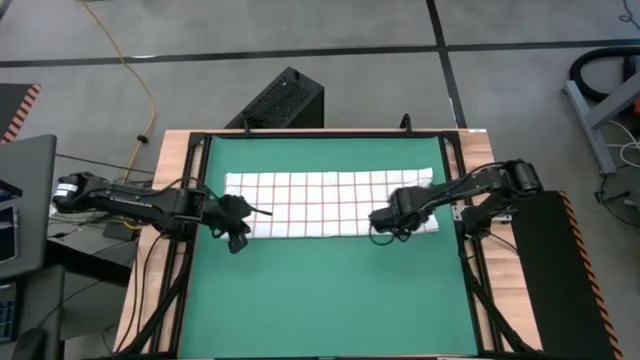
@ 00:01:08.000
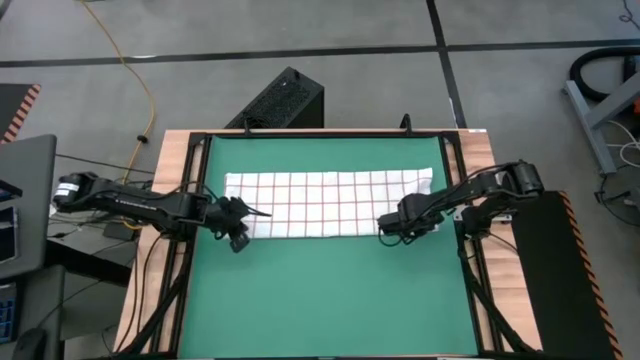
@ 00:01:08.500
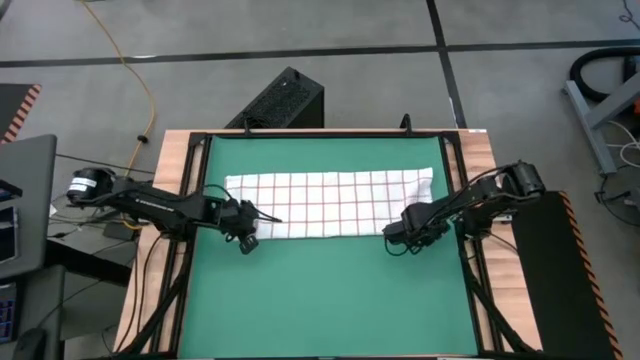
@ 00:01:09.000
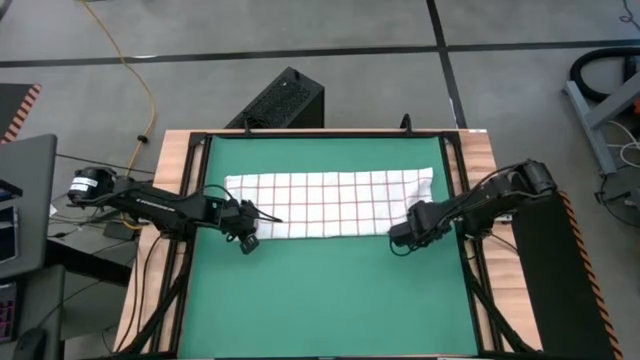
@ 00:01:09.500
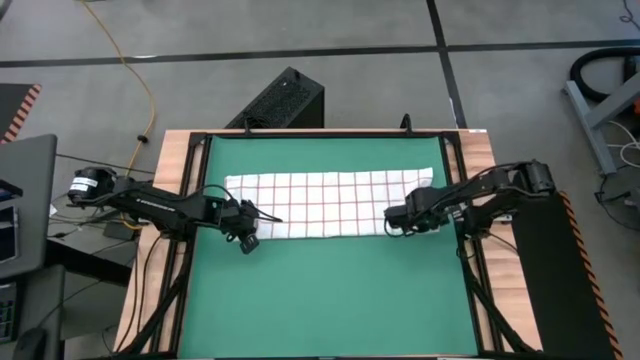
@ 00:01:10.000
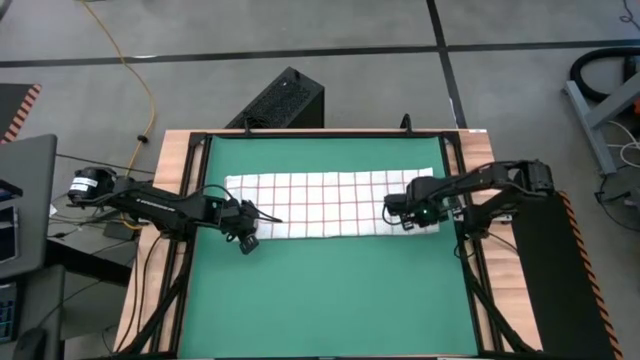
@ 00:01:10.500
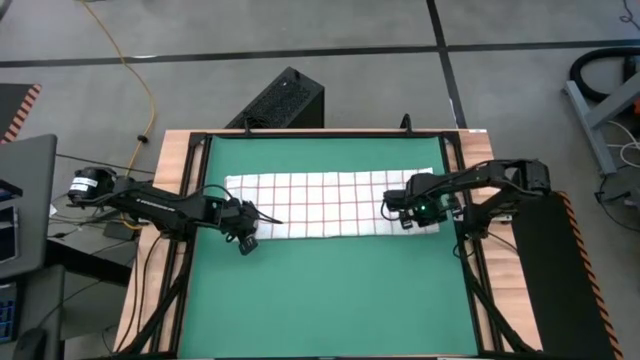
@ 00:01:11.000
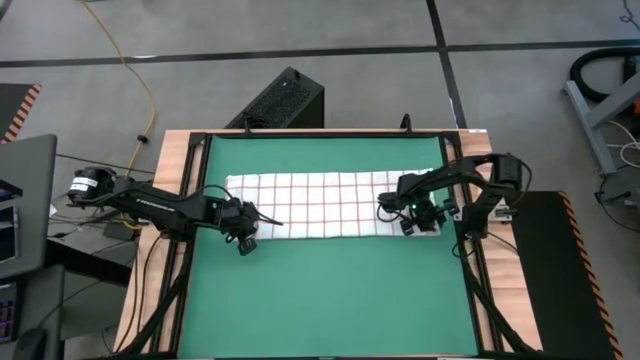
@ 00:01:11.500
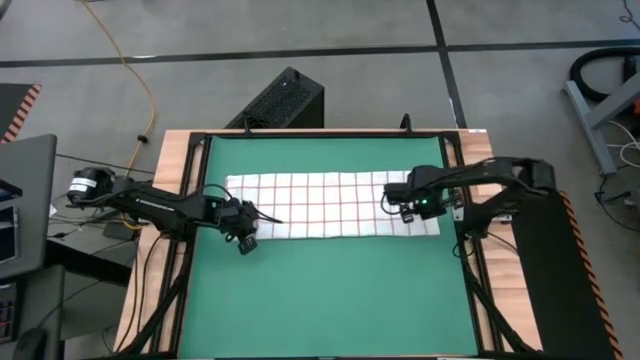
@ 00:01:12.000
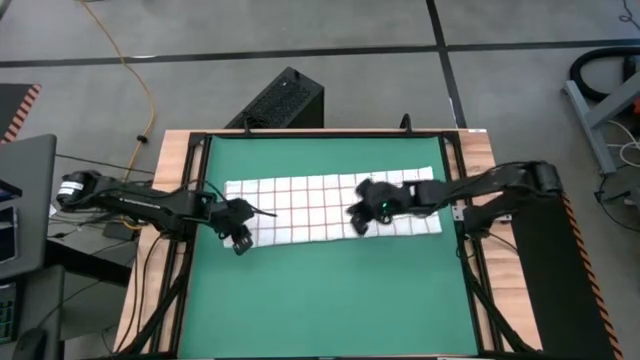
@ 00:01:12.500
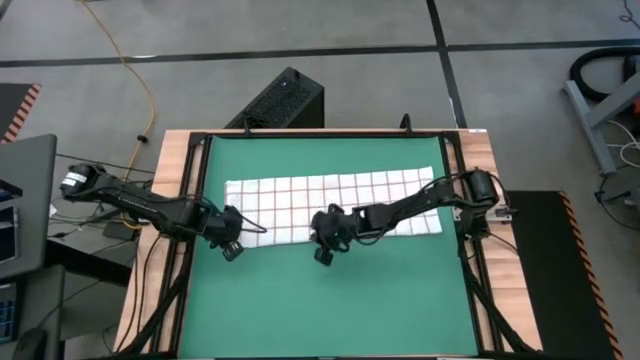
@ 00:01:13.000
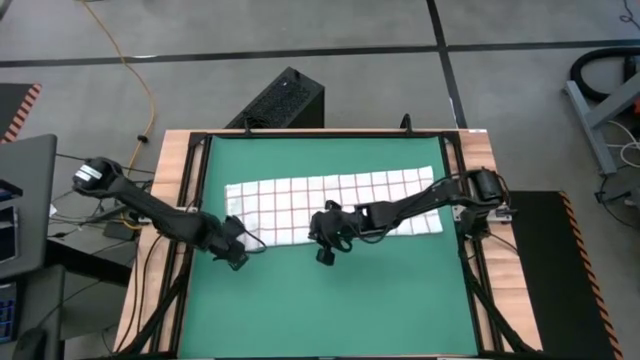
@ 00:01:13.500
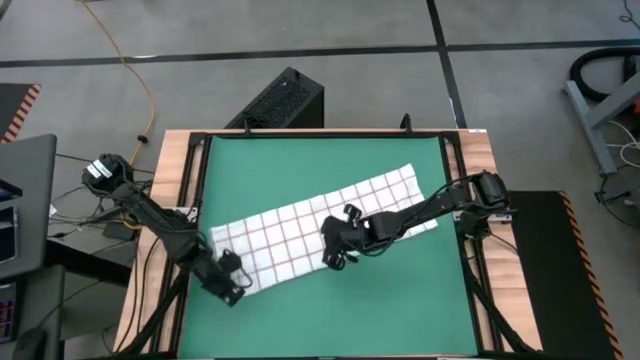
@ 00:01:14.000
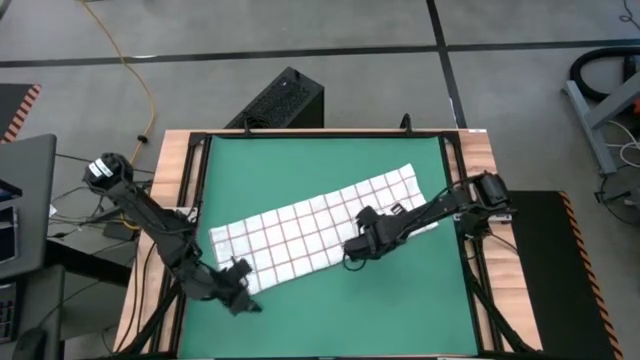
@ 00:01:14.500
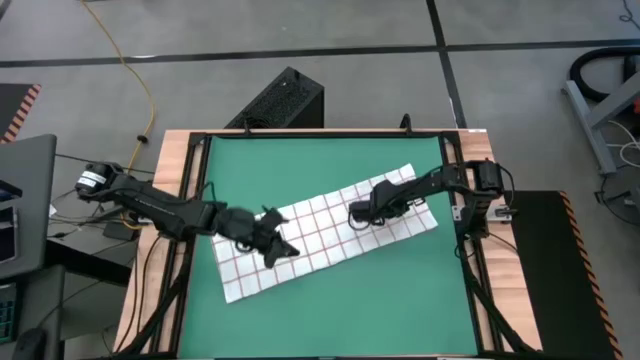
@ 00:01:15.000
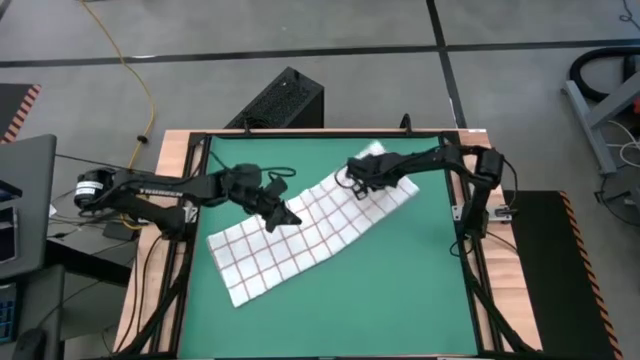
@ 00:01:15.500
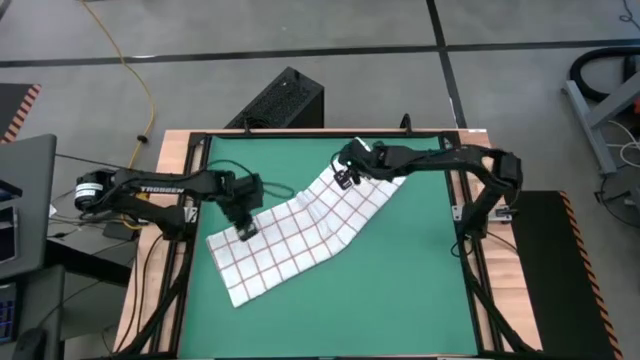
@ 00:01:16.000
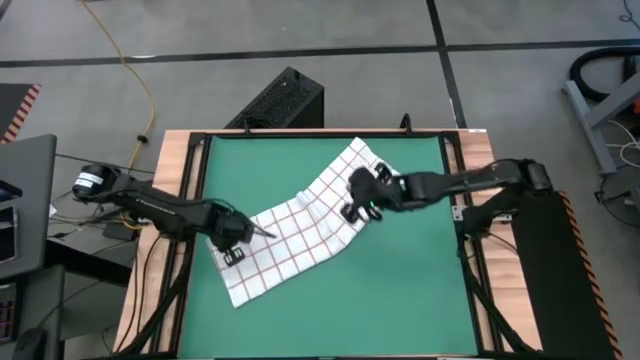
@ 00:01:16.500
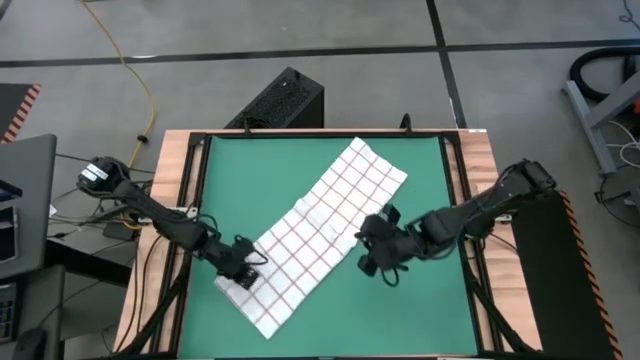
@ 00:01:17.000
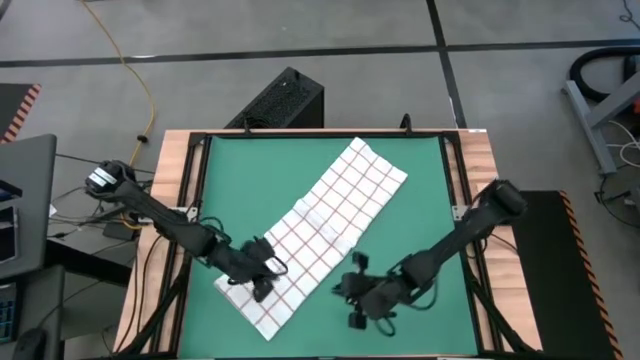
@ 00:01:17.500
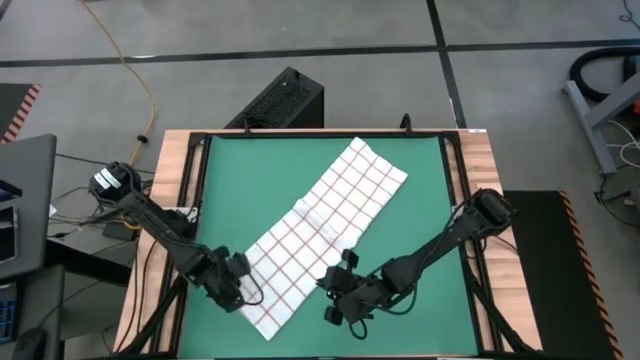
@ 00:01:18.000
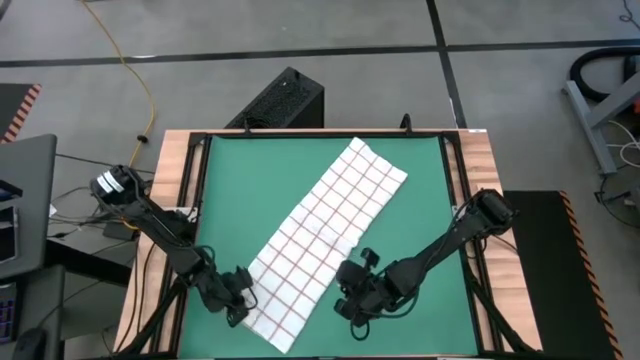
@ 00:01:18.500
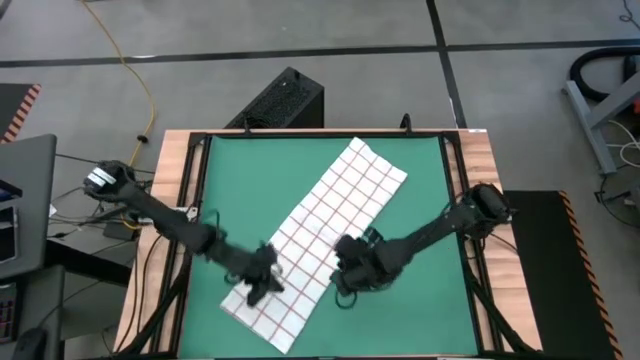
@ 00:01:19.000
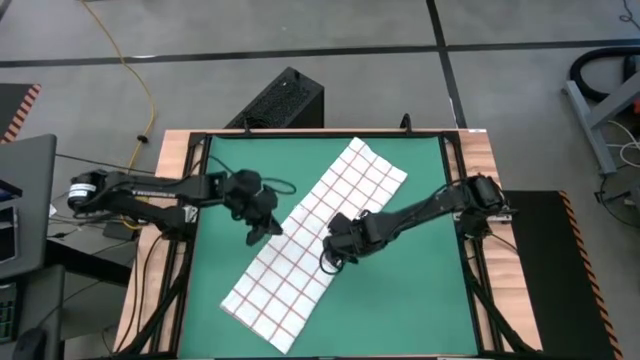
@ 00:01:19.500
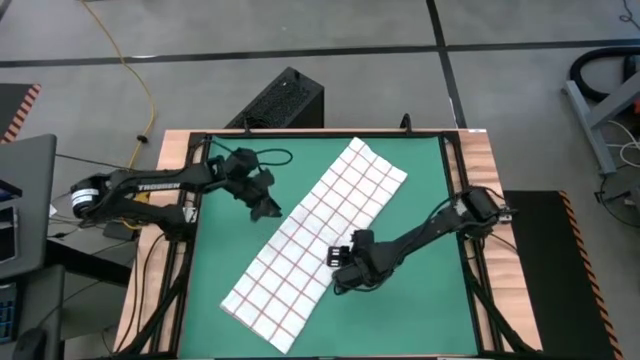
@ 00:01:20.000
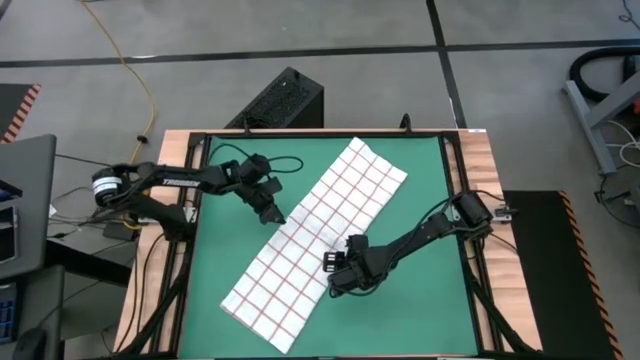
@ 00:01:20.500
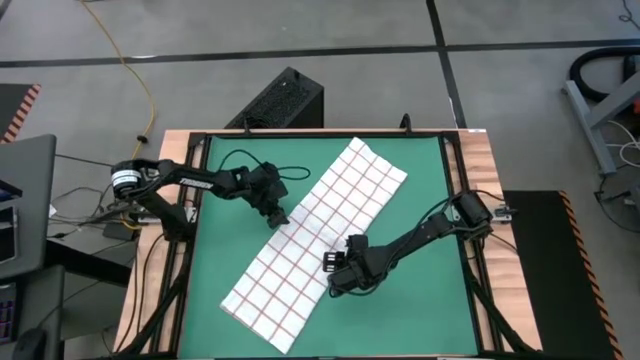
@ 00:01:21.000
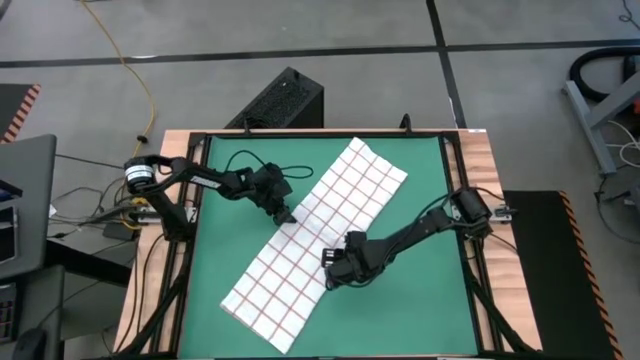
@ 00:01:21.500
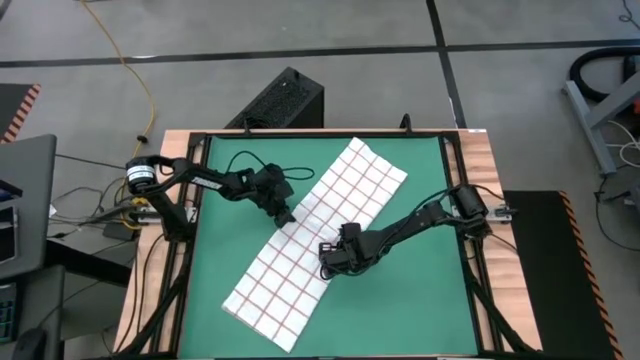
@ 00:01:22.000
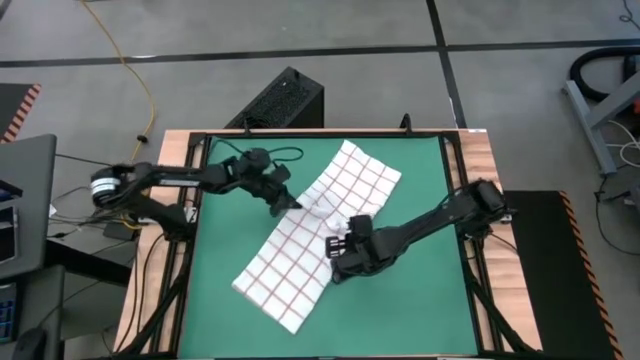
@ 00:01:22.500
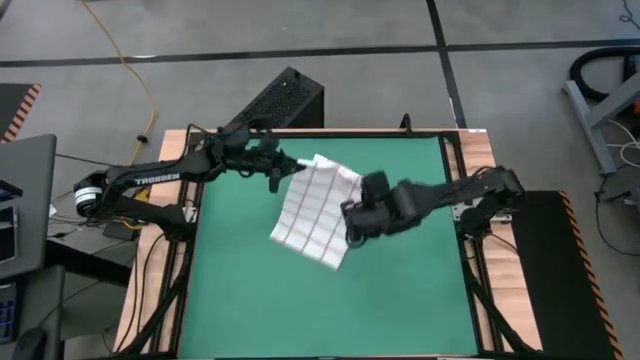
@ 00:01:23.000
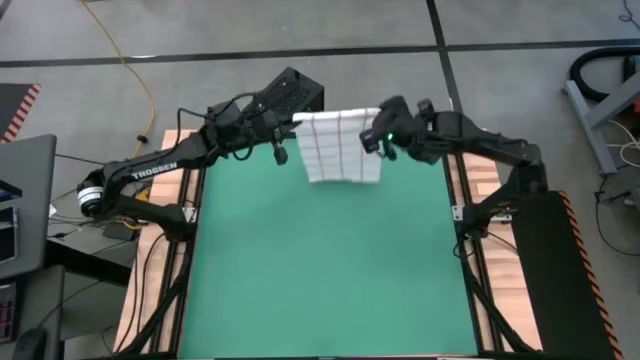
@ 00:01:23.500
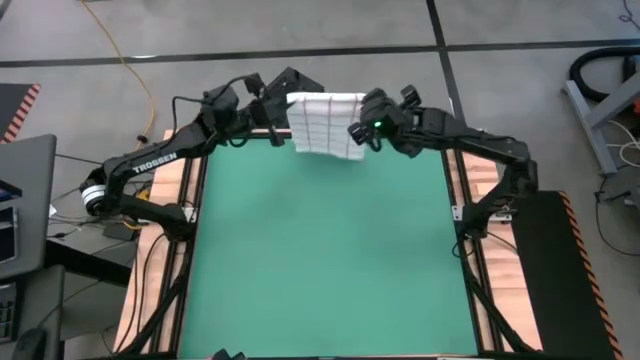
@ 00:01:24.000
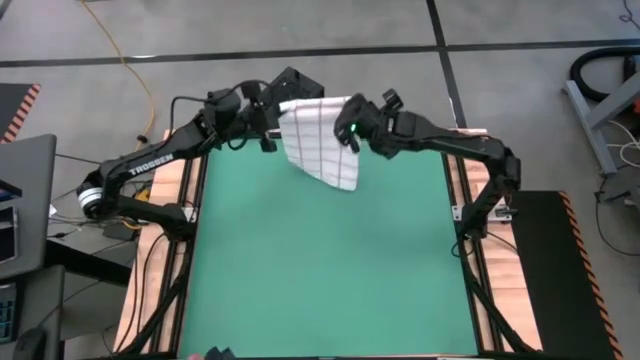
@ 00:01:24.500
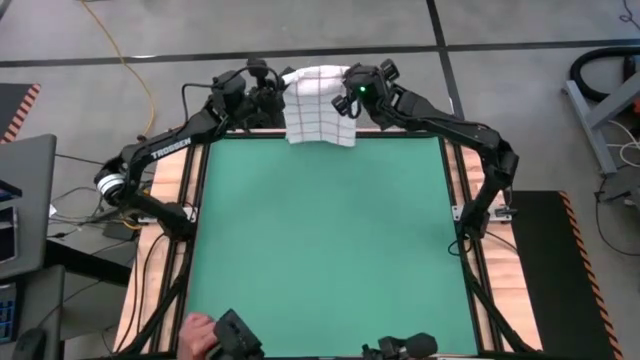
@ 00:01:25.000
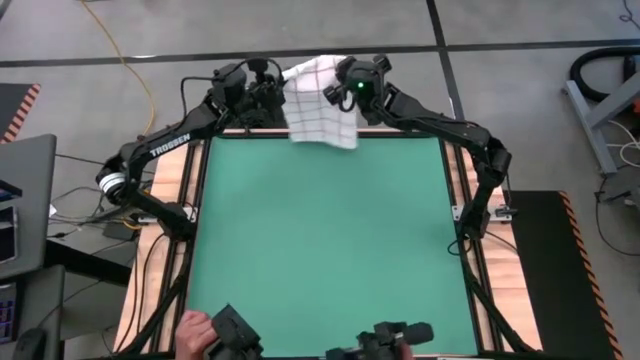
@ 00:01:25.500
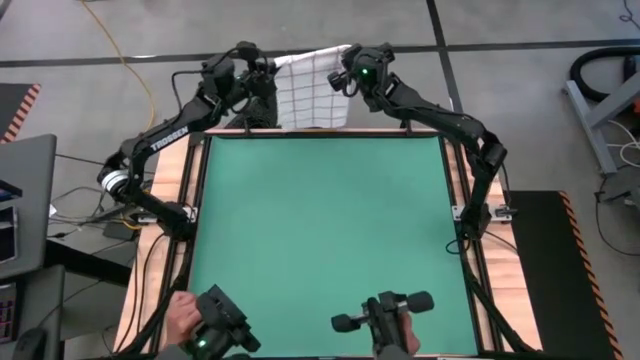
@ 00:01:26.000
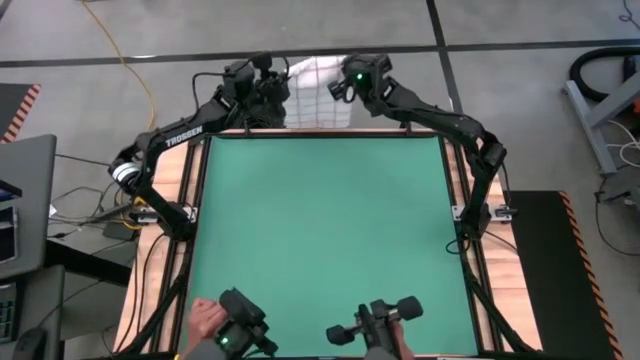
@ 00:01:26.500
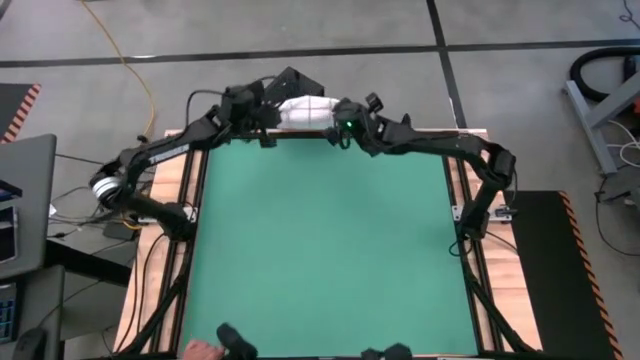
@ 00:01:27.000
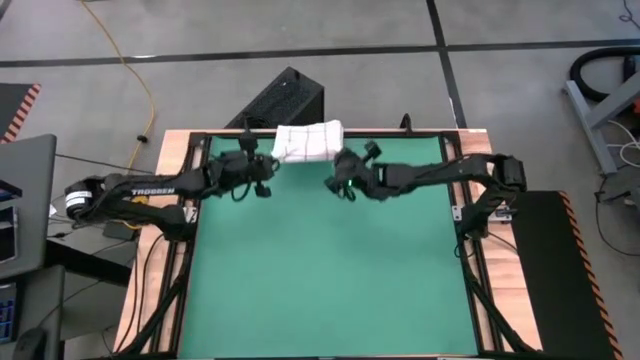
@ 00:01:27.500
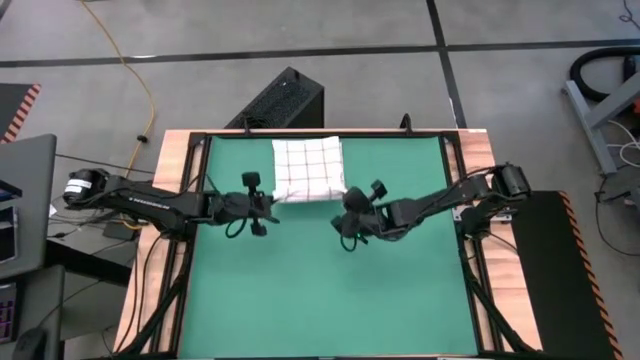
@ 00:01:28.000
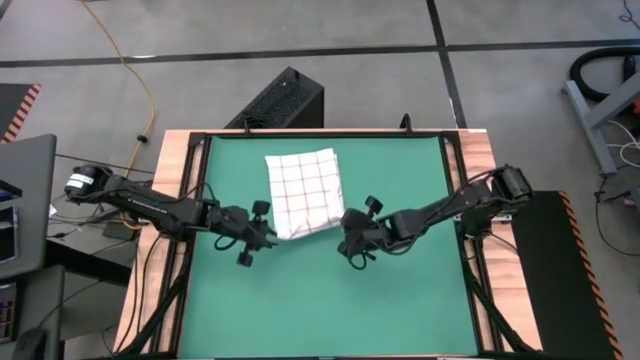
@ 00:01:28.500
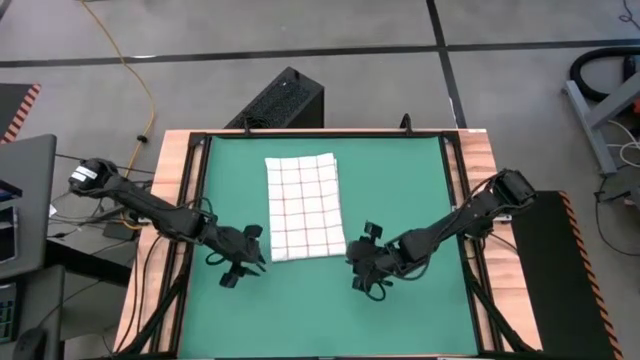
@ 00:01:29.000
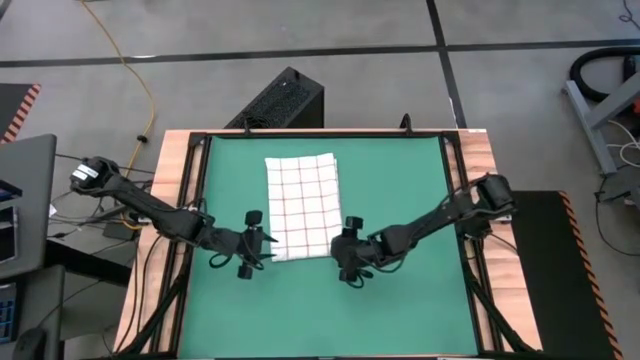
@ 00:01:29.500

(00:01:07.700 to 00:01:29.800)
Task: Roll towel into tight, uniform cylinder
Roll the white patterned towel
